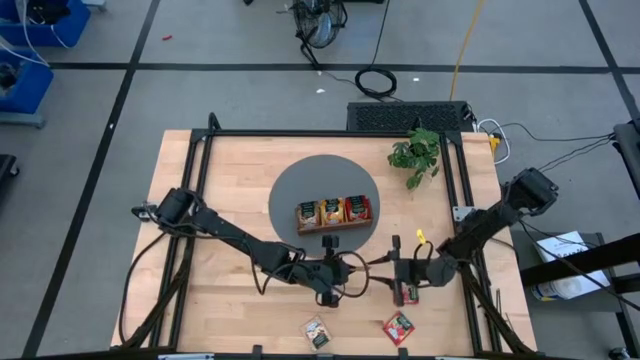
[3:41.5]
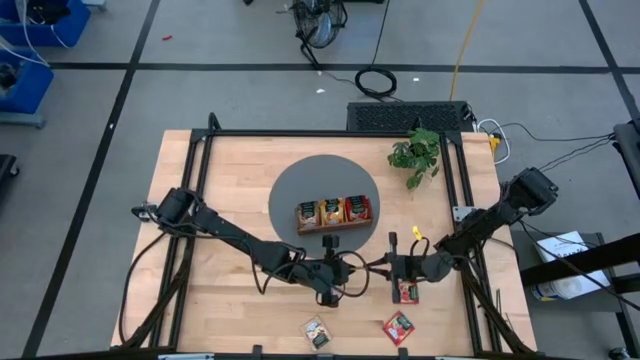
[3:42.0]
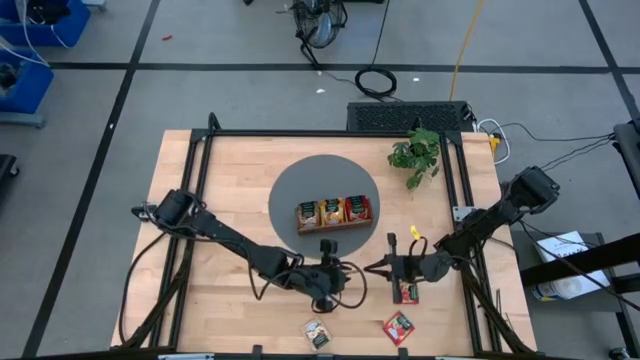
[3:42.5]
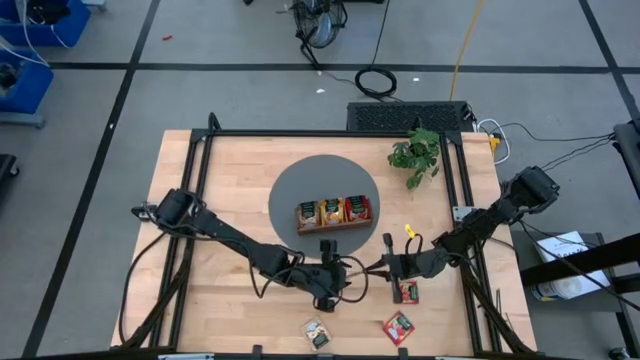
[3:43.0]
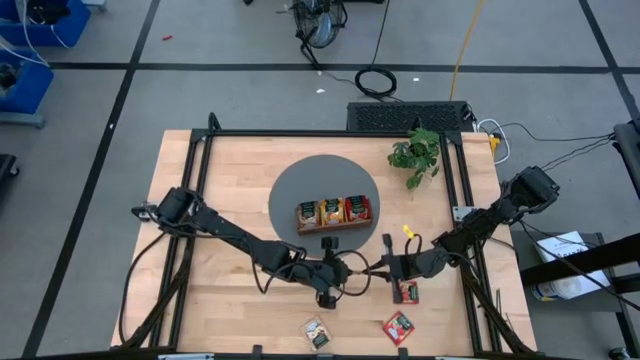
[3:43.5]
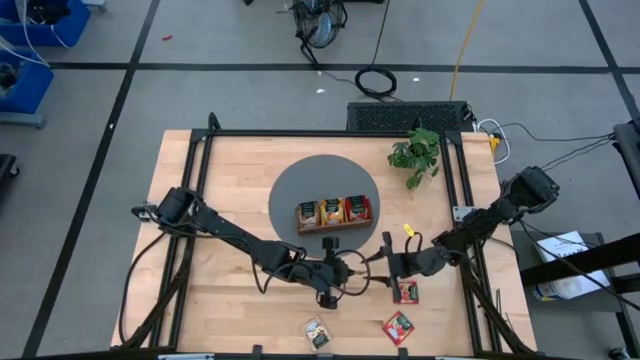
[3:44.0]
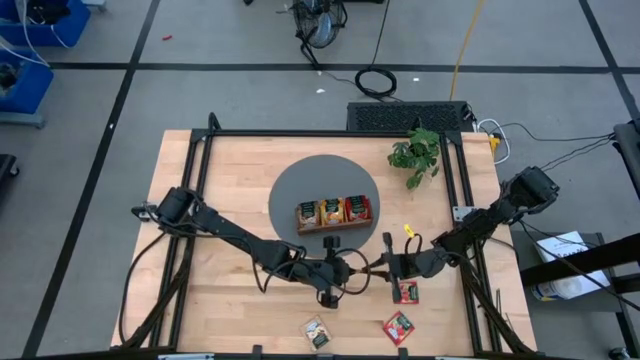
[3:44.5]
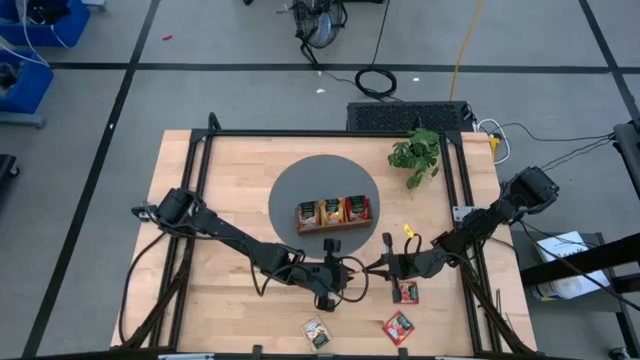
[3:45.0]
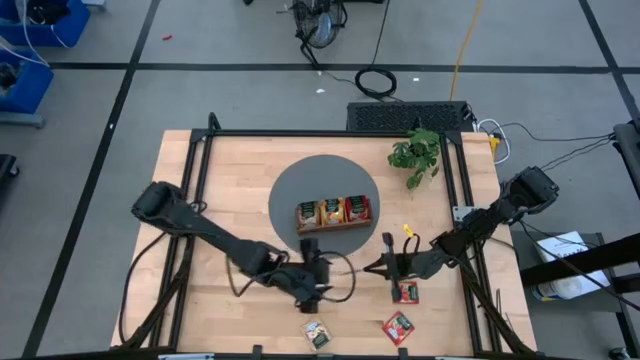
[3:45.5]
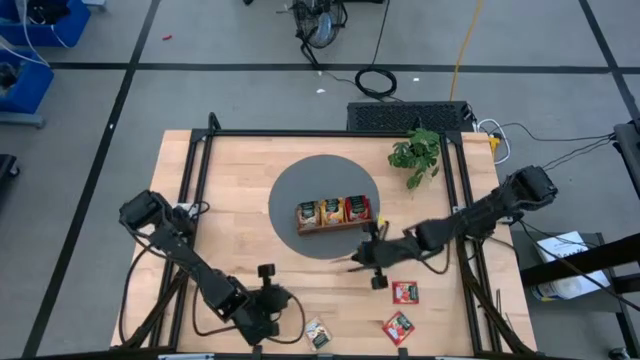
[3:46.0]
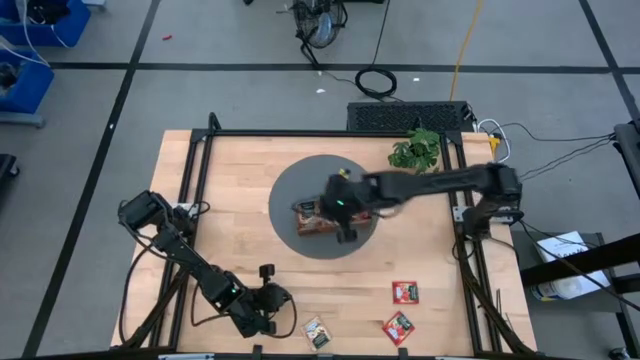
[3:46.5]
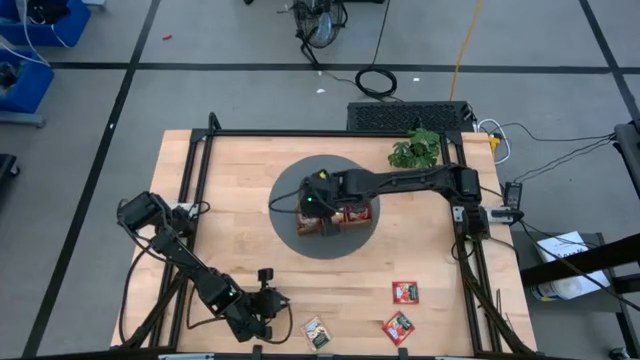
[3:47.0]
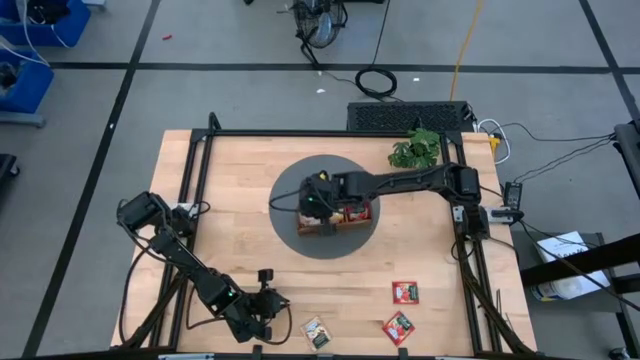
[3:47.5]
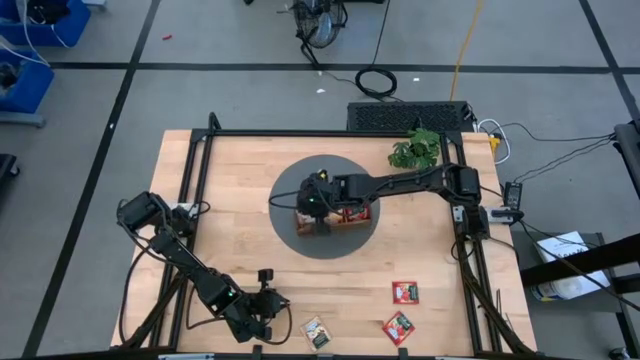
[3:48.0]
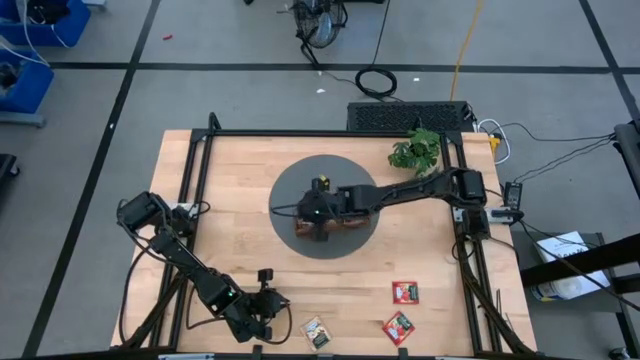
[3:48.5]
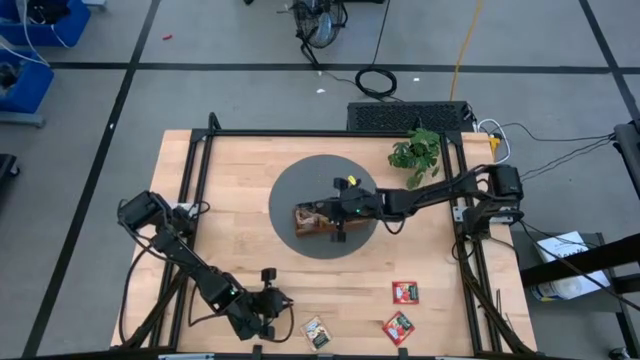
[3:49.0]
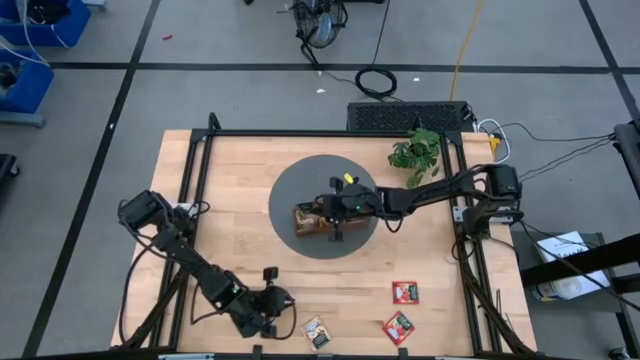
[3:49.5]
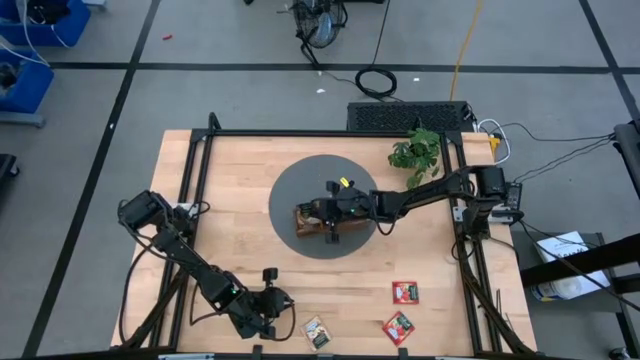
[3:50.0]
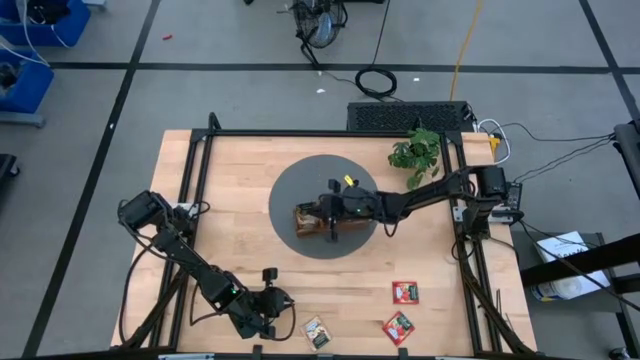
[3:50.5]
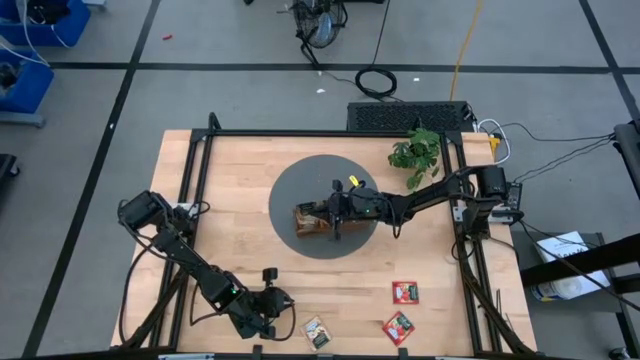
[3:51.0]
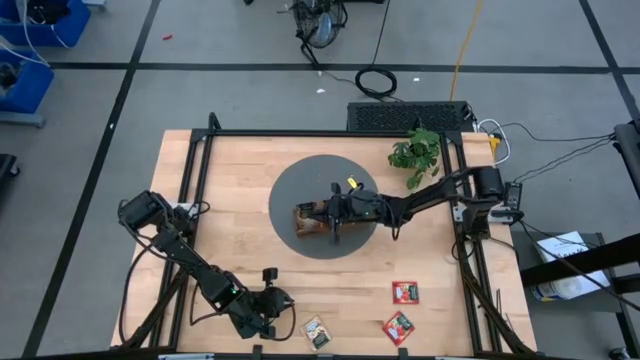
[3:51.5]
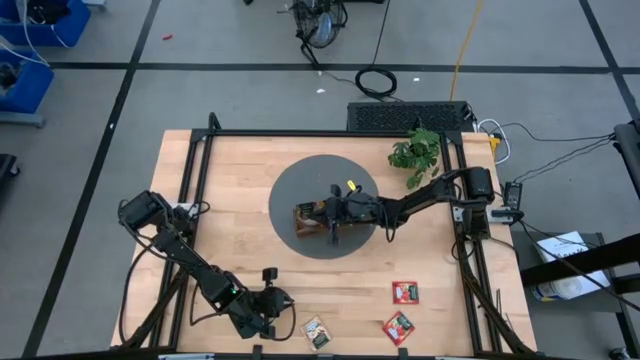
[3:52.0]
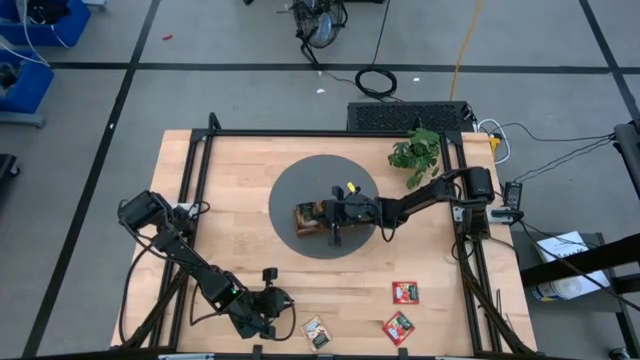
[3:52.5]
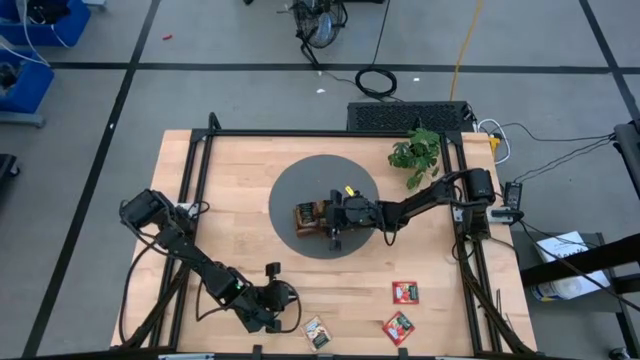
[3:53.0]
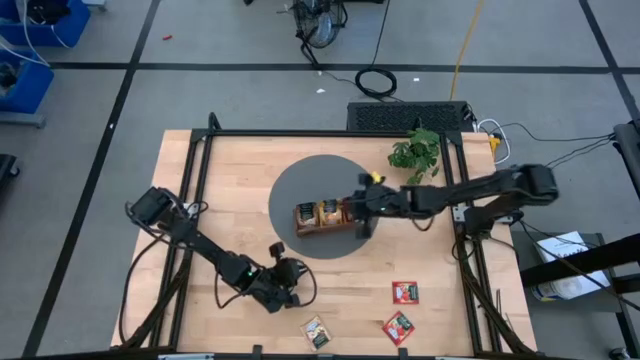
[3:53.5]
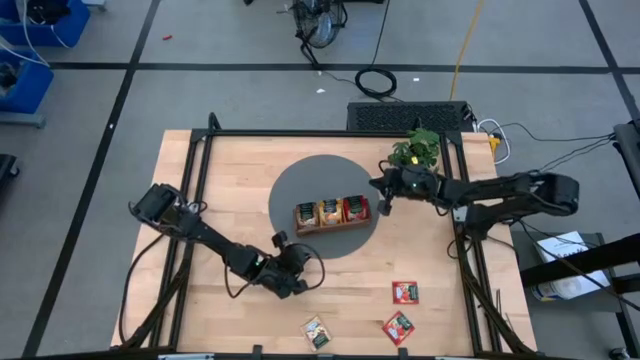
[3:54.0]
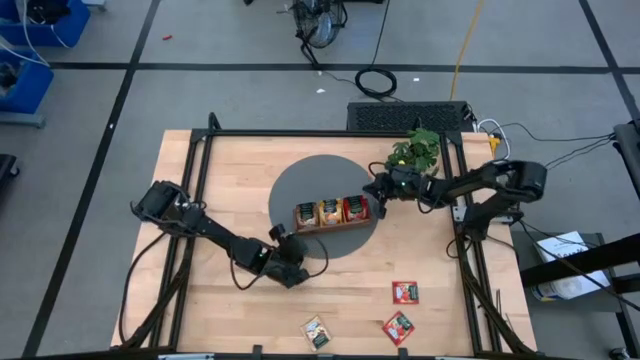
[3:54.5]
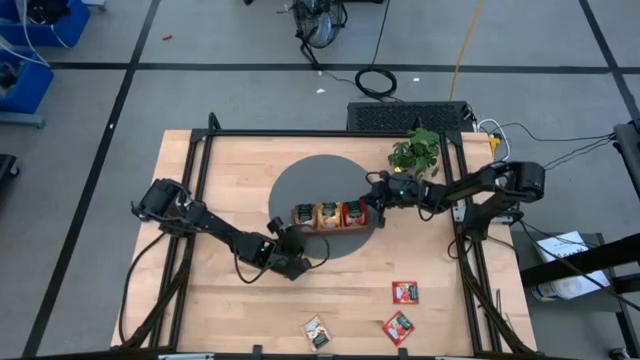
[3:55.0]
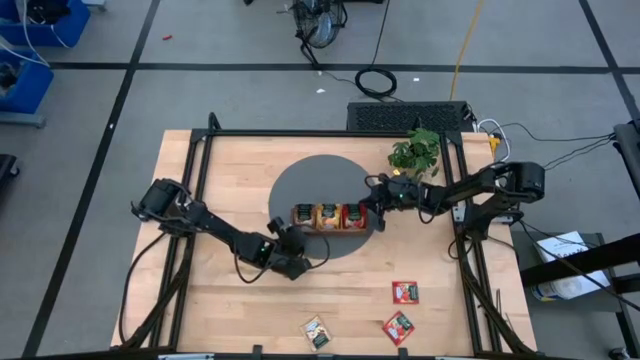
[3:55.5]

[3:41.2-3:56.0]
Task: Pick & Place Tea
Put the brown tea bag into the left section of the wooden organizer

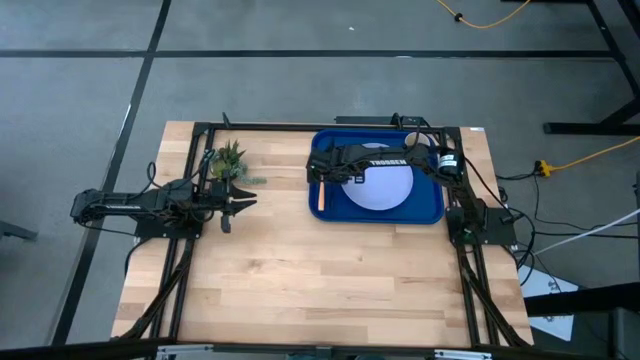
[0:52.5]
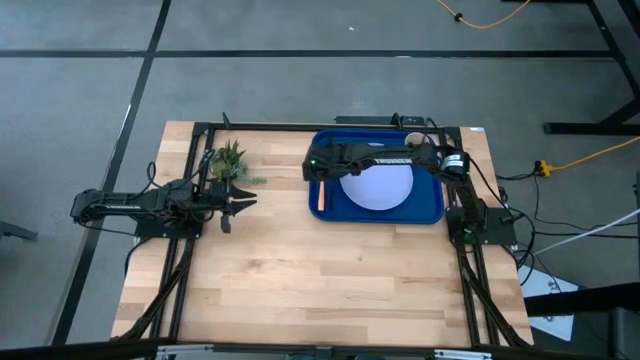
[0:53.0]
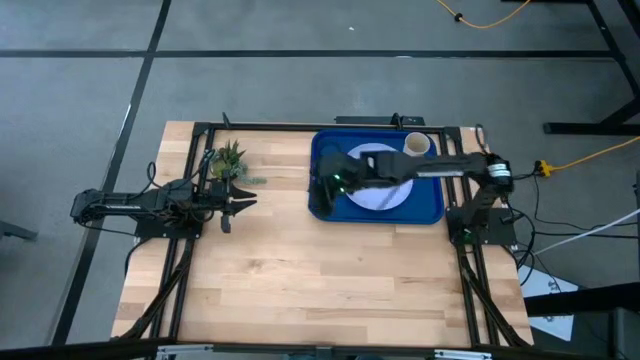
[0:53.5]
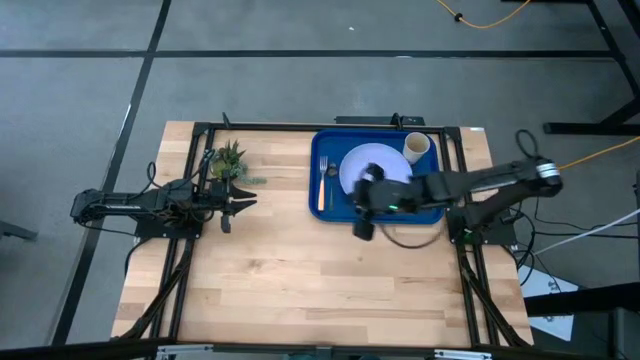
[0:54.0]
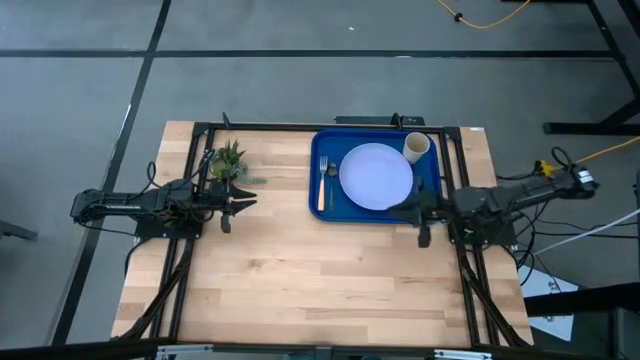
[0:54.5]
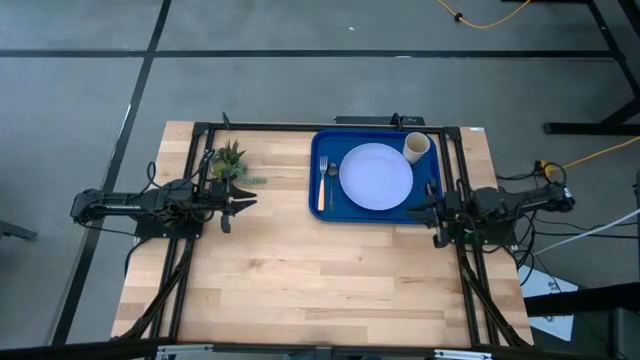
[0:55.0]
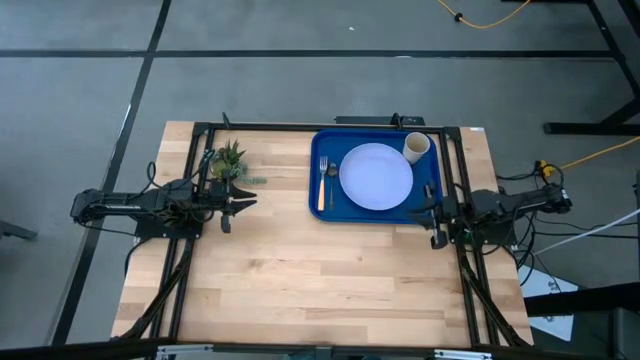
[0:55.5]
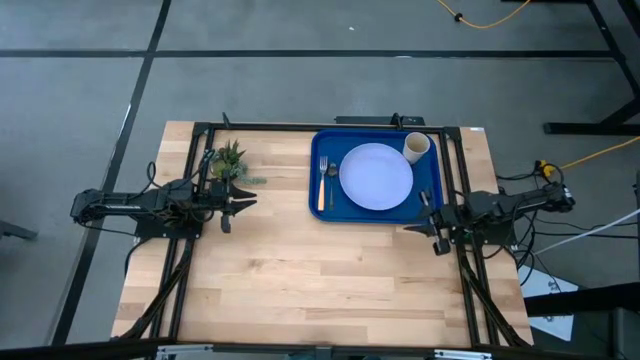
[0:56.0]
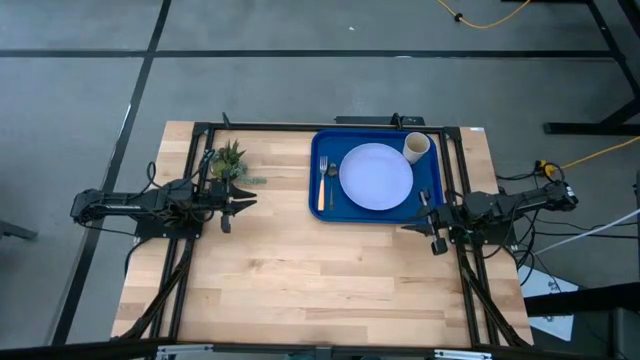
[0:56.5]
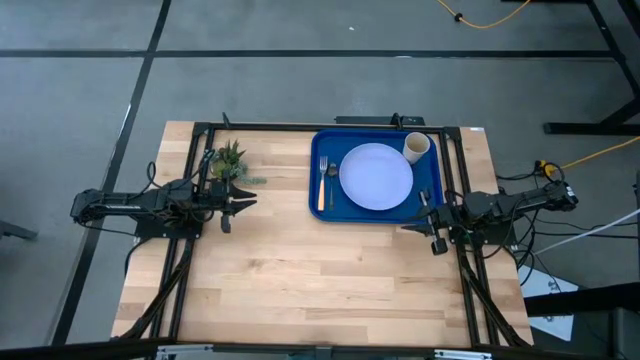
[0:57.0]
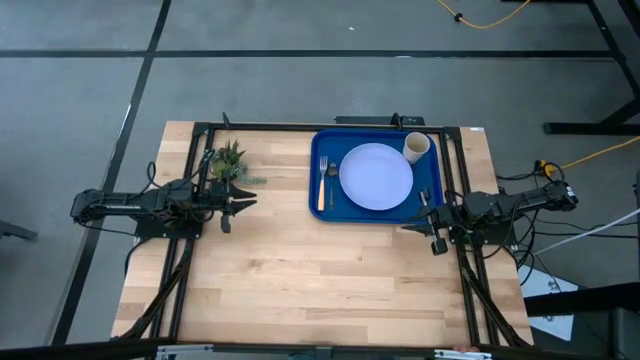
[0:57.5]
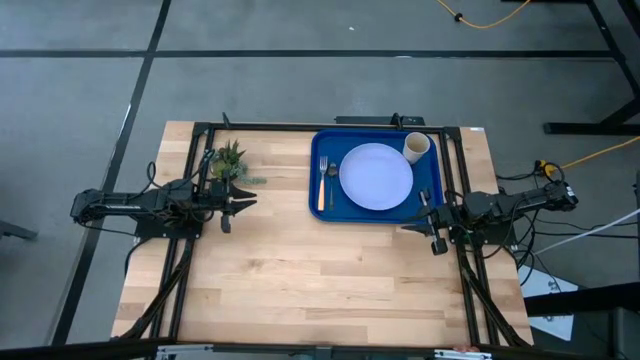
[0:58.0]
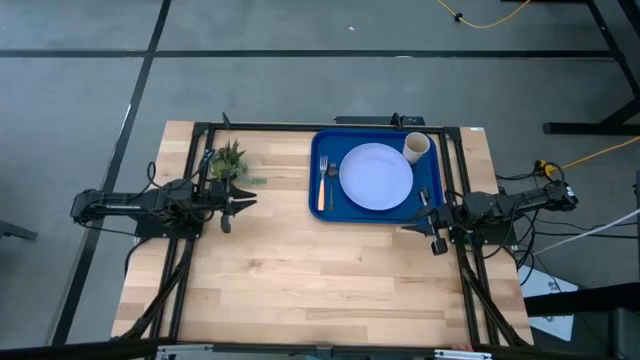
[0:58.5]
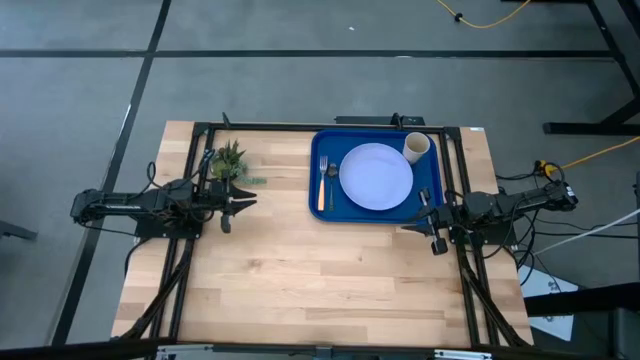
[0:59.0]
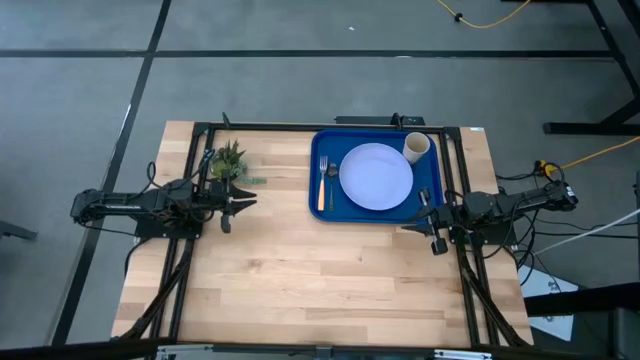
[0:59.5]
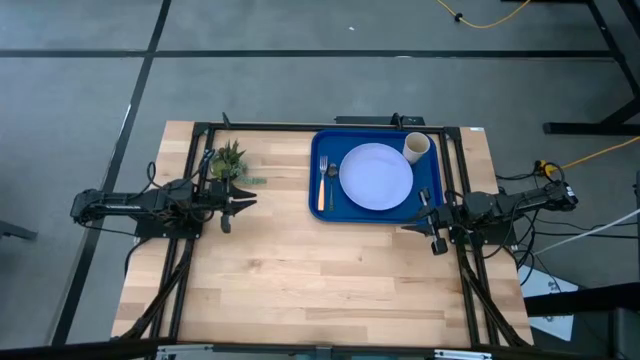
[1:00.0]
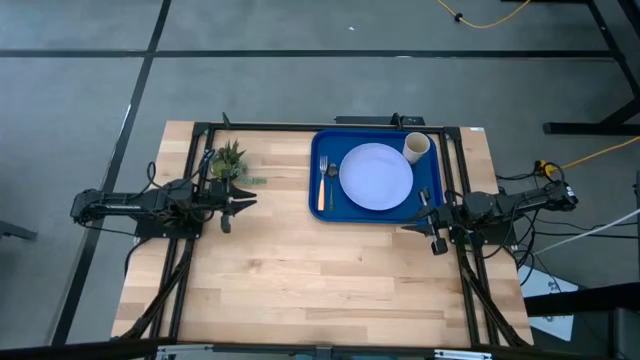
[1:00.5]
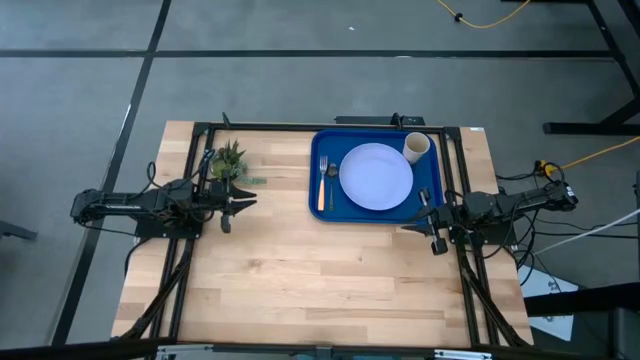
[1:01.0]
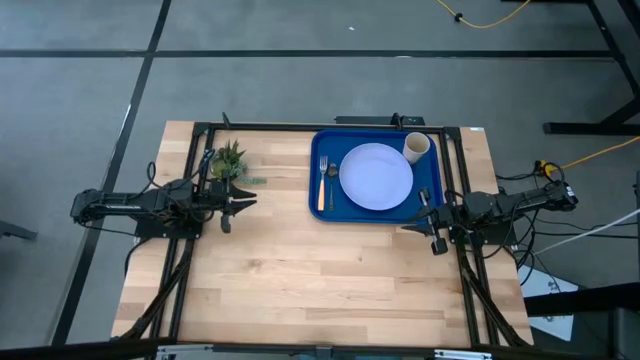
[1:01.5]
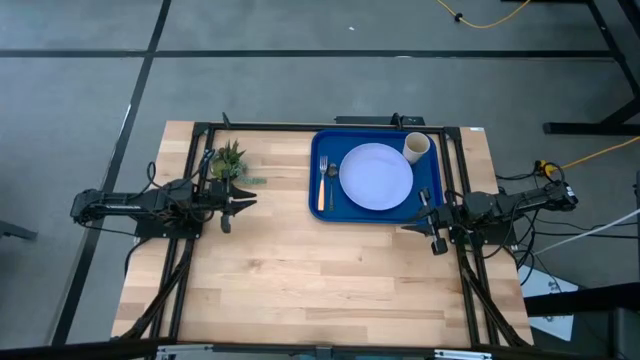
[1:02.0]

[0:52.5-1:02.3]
Task: Pick and place plate/cup/fork/spoon on tray
Return to Home Position
